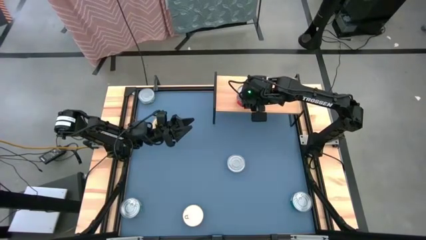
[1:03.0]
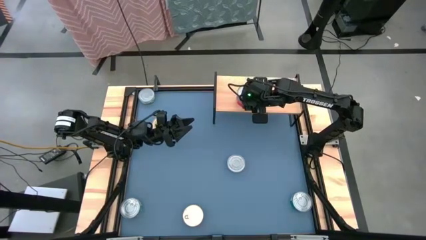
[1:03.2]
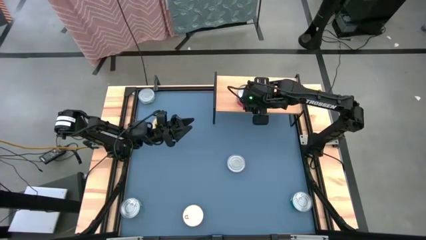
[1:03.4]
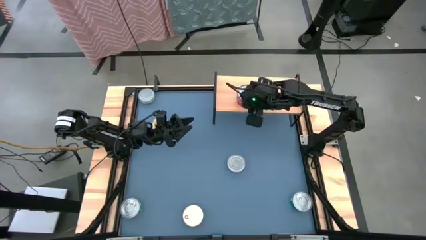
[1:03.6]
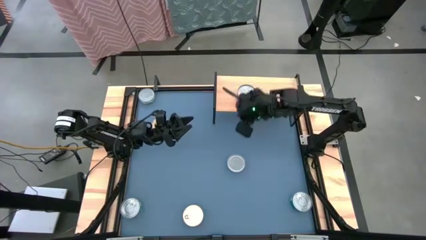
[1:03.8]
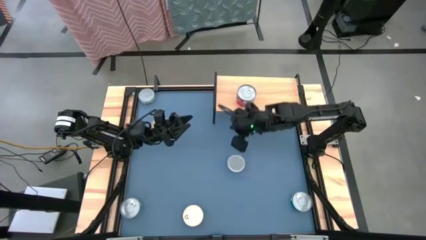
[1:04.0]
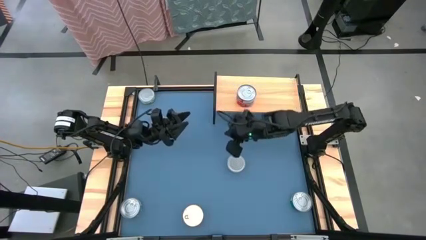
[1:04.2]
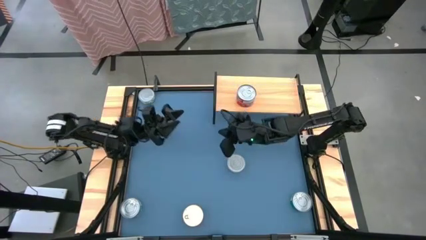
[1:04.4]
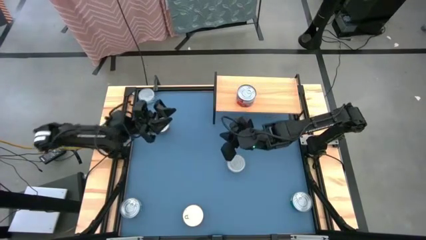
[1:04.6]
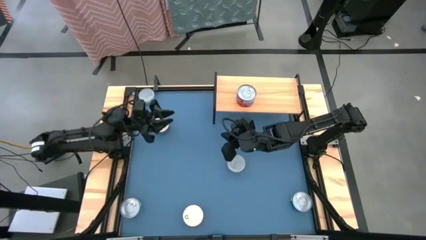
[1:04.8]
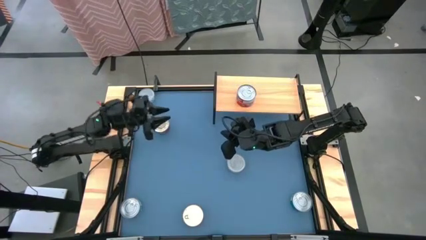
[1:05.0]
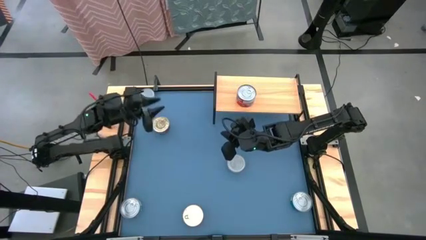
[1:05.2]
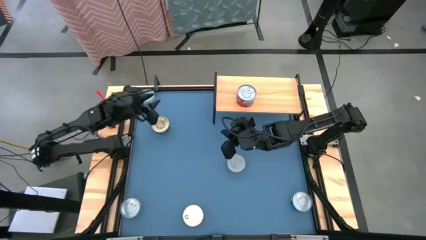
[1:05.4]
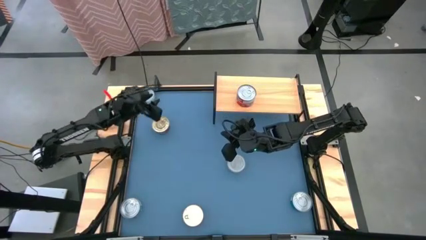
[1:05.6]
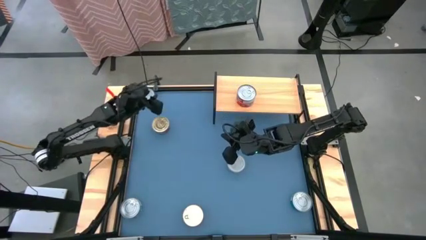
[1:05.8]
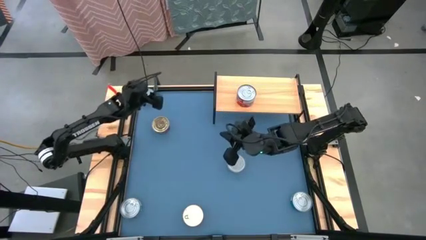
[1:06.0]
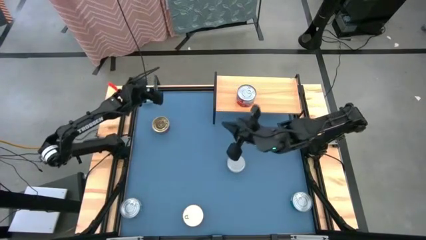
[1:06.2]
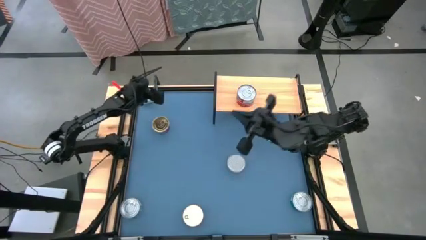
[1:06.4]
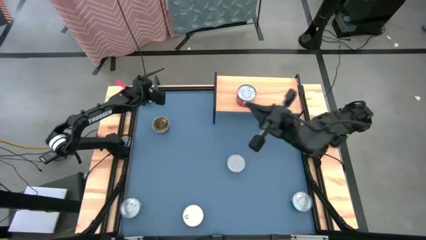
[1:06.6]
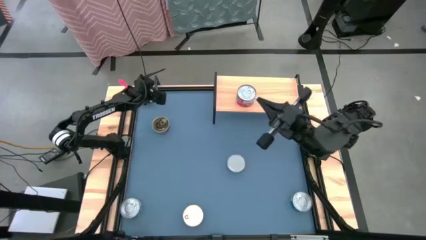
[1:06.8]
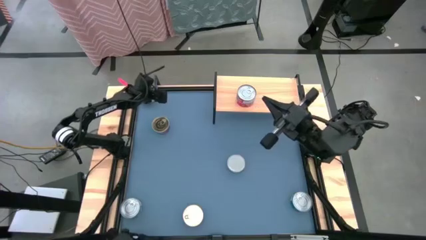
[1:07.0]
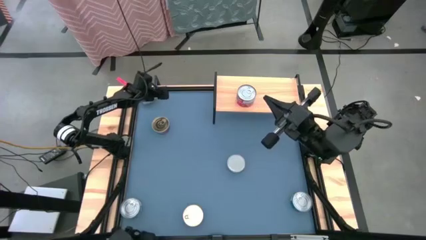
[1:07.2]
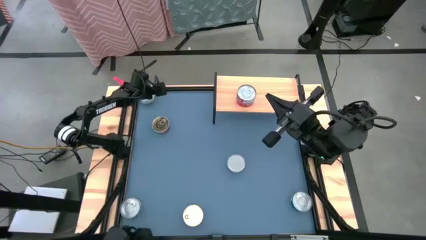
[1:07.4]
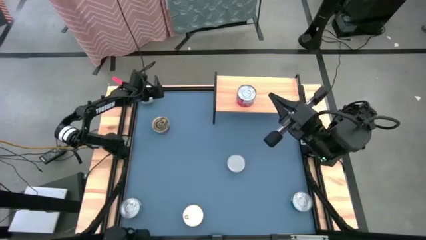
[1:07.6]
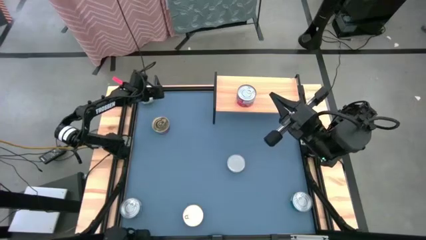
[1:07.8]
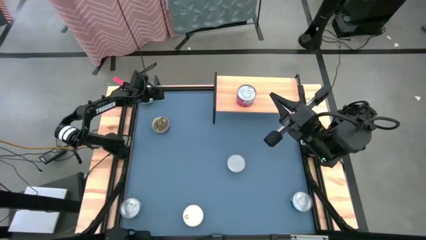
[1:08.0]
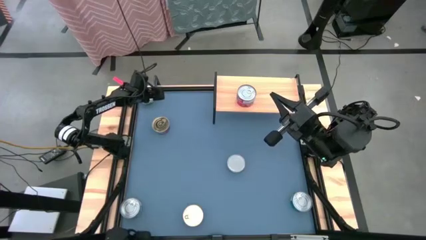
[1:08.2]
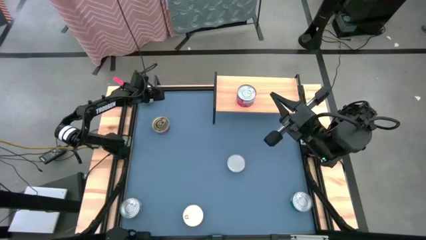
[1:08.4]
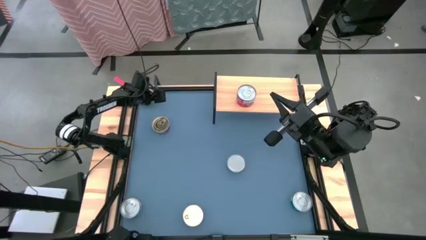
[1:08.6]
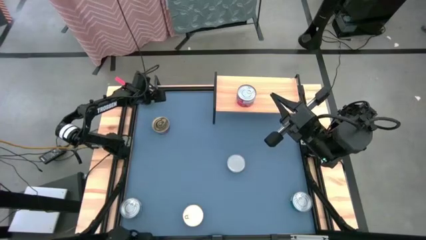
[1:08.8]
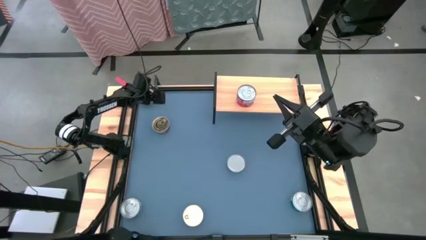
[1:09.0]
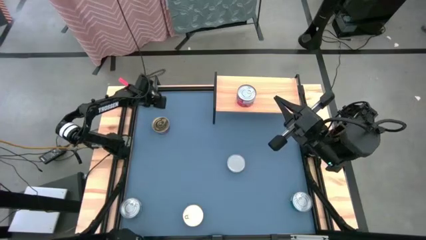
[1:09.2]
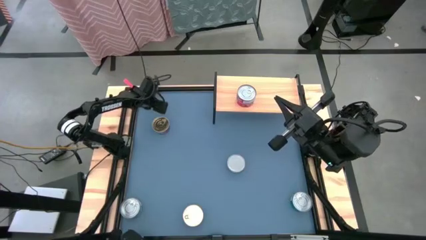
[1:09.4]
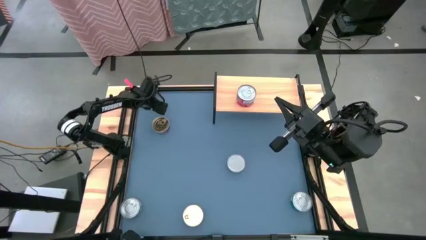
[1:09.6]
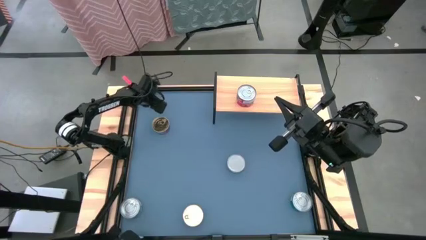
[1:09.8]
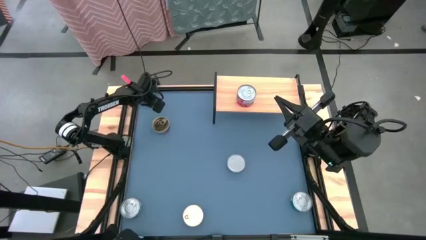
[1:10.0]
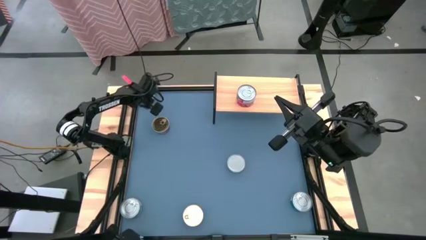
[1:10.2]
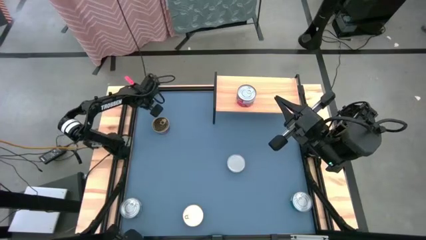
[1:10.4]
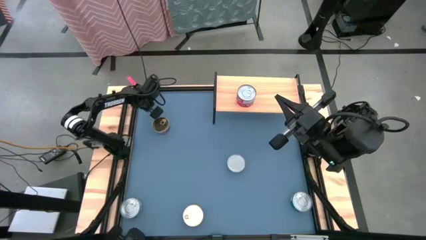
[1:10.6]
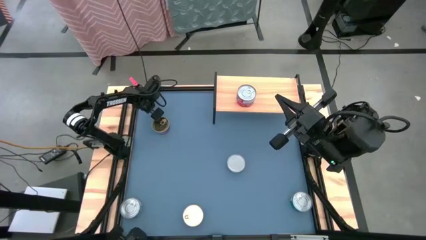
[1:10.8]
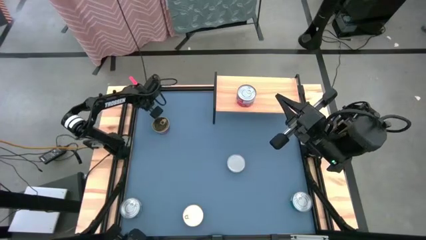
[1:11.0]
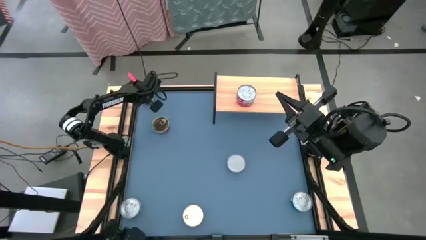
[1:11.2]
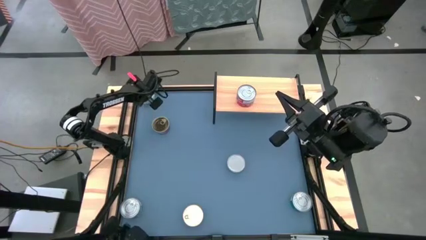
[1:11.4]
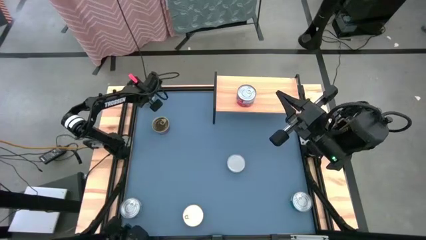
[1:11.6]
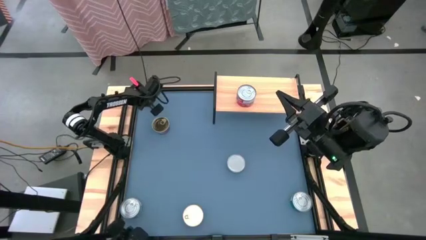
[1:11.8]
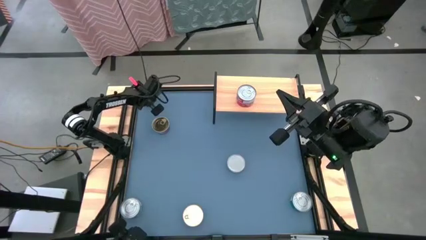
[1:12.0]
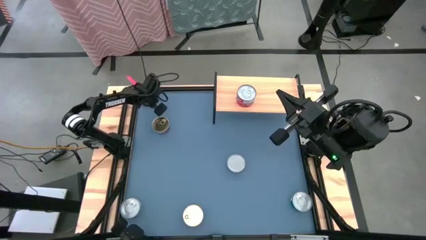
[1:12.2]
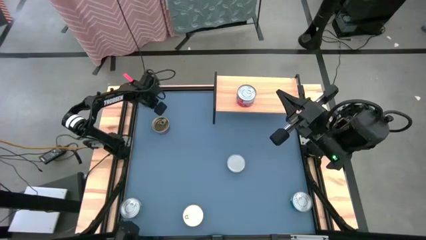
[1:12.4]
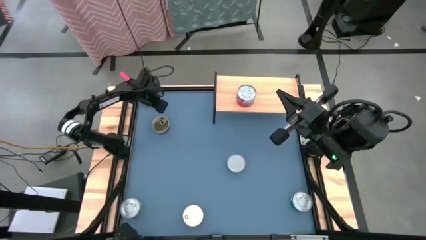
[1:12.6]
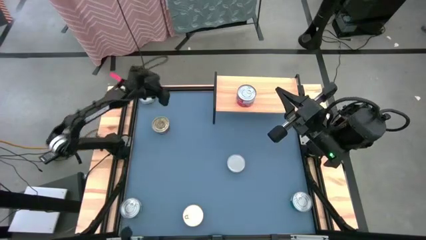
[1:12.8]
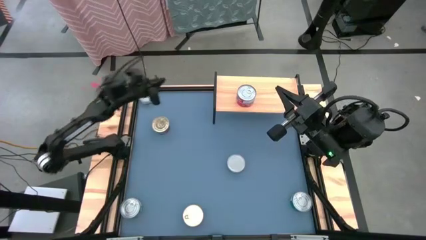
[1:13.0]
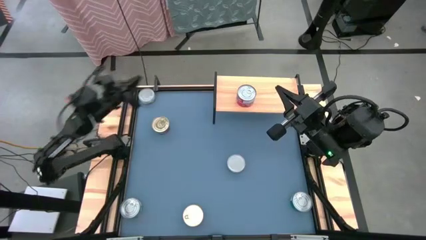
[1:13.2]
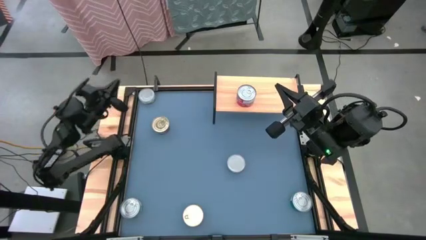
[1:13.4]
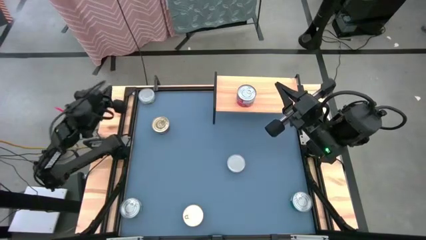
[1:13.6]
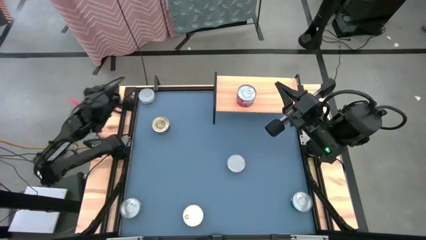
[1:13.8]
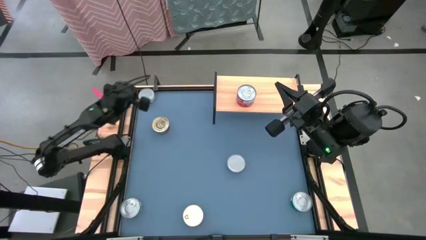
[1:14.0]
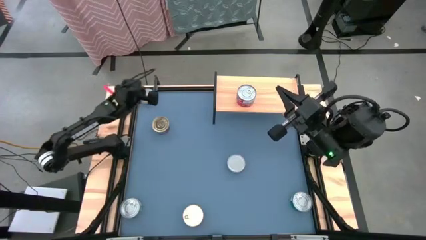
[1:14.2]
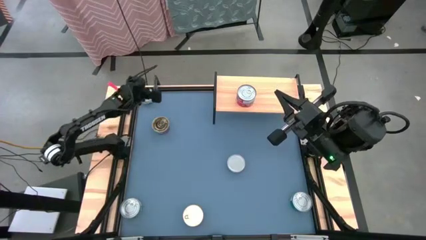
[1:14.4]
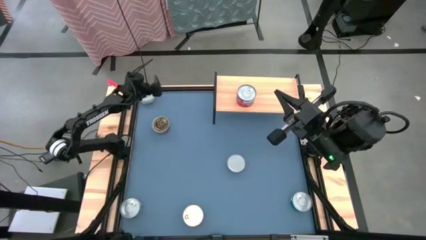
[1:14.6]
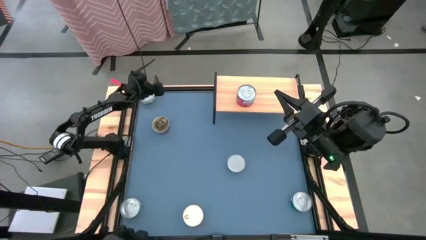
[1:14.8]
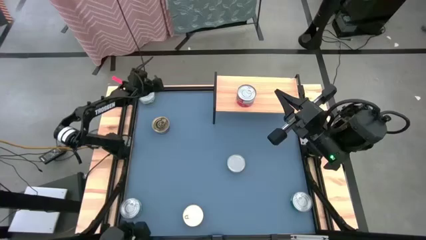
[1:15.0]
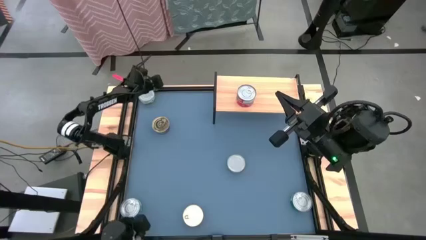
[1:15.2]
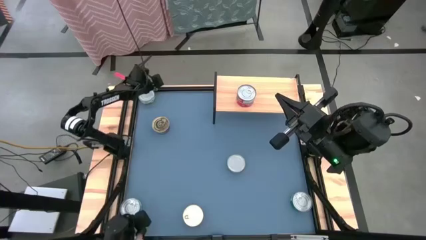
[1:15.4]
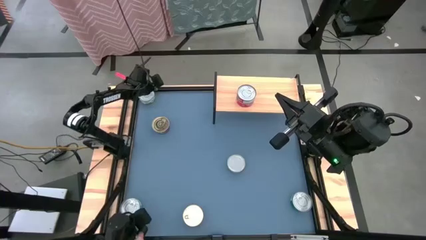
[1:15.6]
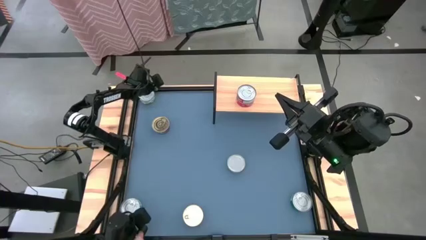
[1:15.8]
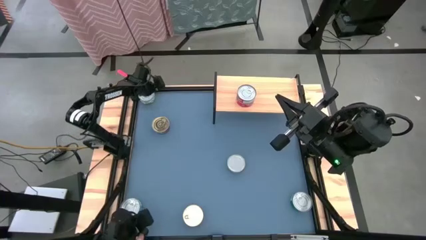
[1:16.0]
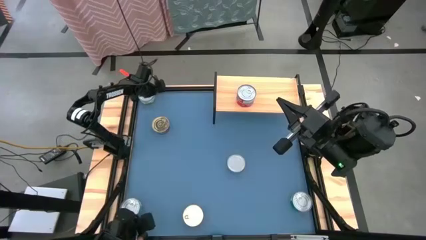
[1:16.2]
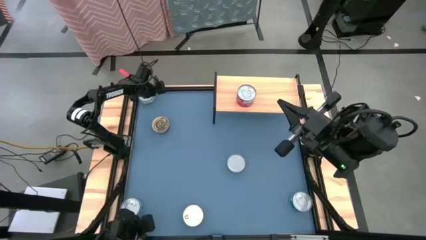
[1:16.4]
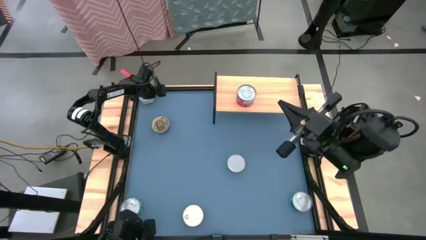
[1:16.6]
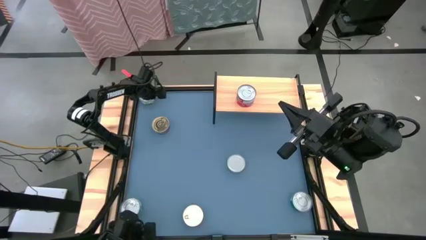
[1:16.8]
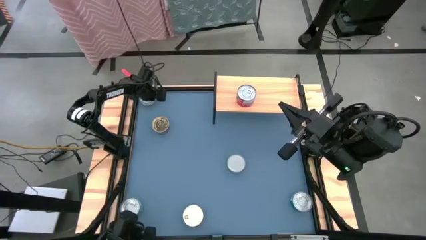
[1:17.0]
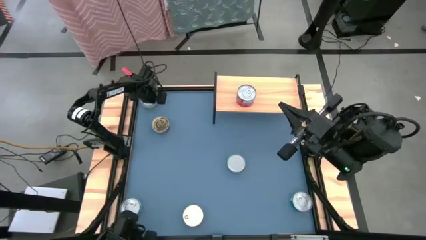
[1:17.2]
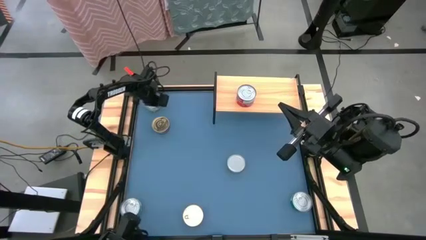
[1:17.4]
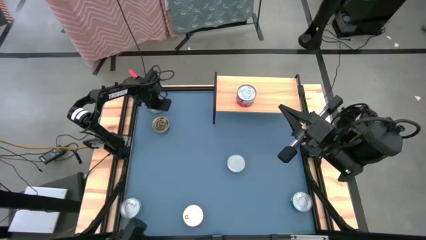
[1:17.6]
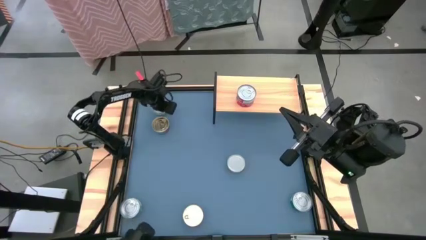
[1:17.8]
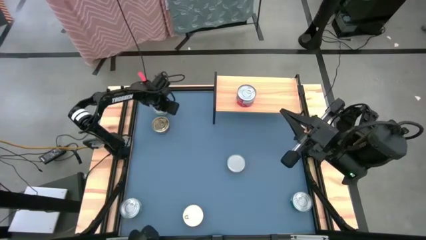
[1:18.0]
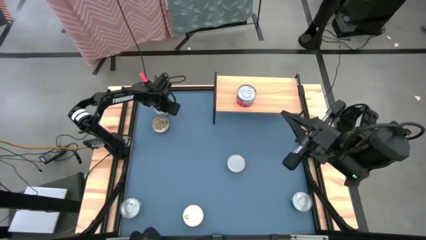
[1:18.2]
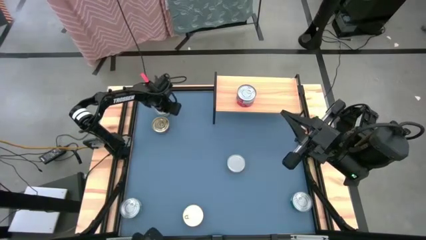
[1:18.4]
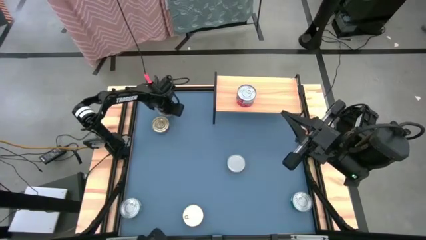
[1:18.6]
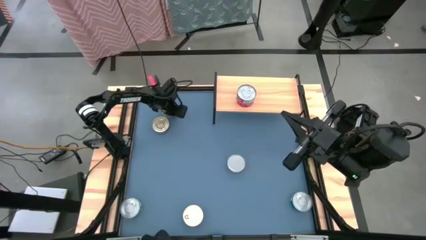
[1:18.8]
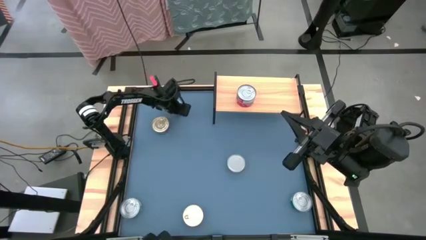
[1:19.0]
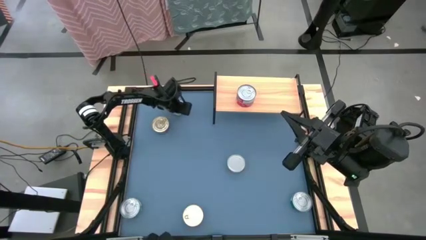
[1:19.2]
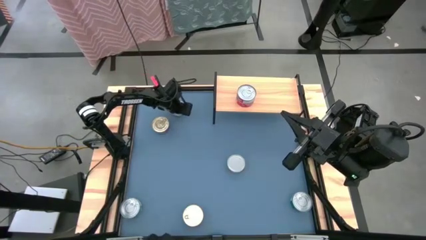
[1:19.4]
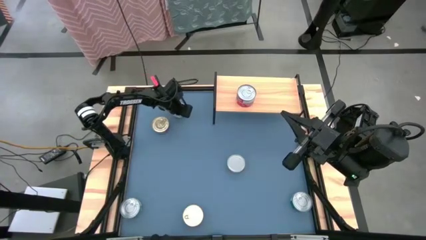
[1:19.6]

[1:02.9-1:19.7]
Task: Stack canned seafood by type on shelf
Put the top green tuna can on the shelf

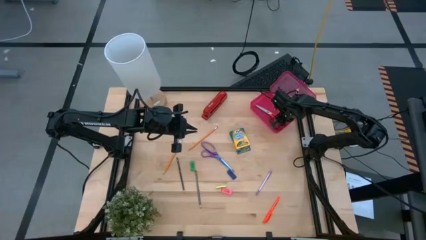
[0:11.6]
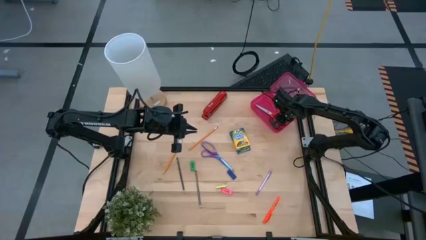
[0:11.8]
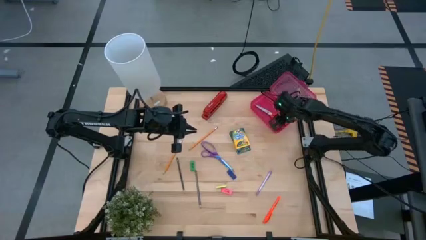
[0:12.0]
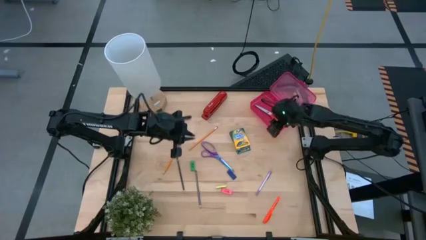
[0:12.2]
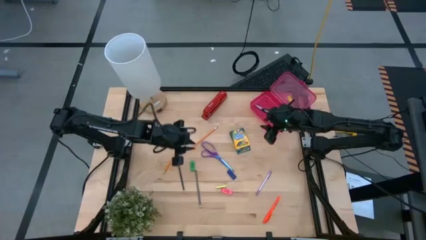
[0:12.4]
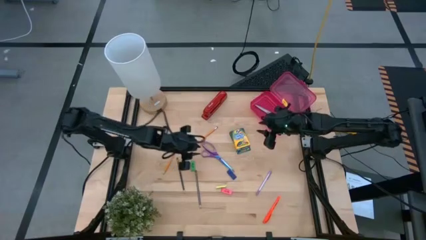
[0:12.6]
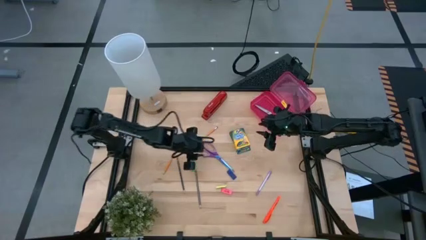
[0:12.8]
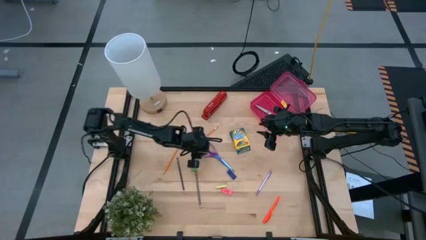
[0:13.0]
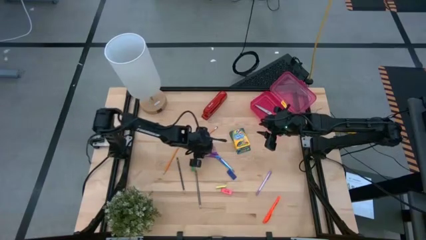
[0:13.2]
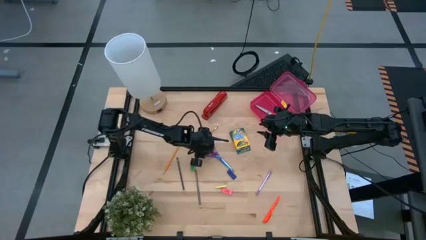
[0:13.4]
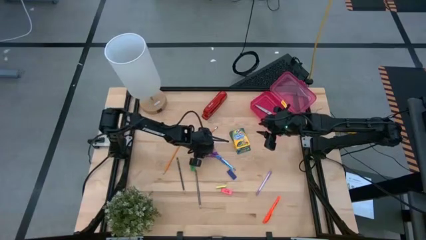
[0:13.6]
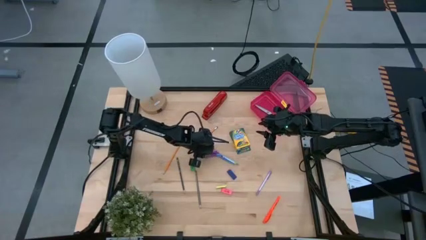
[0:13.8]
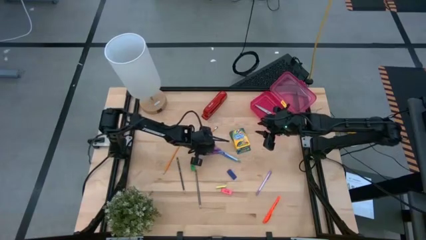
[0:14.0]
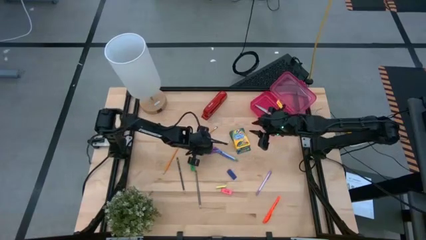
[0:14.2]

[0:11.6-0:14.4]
Task: Pack school essentials
Put the purple scissors into the pink supply box
